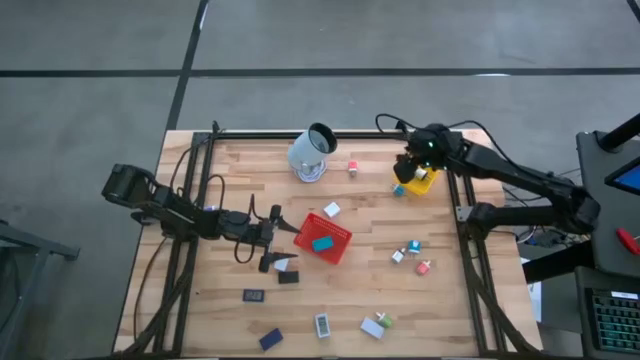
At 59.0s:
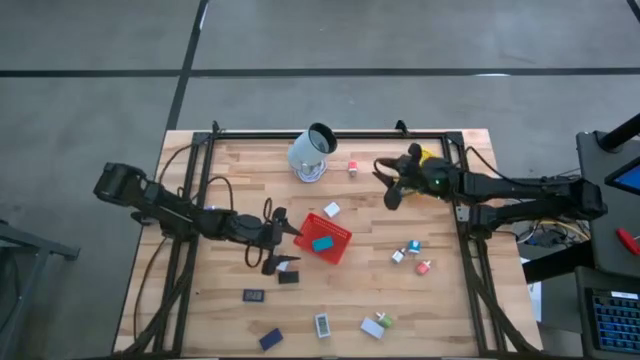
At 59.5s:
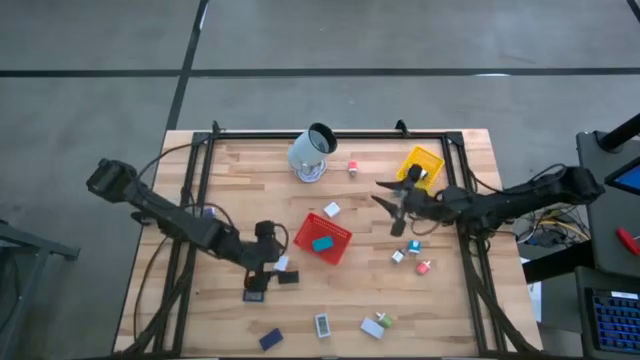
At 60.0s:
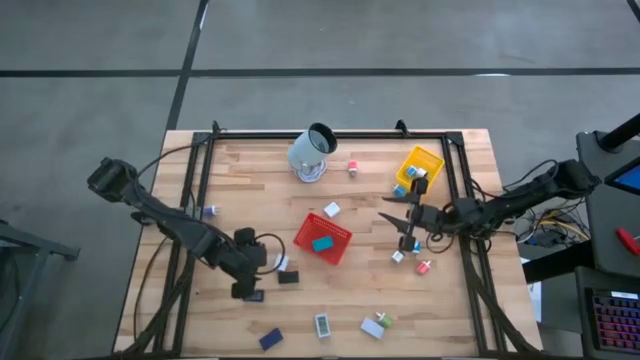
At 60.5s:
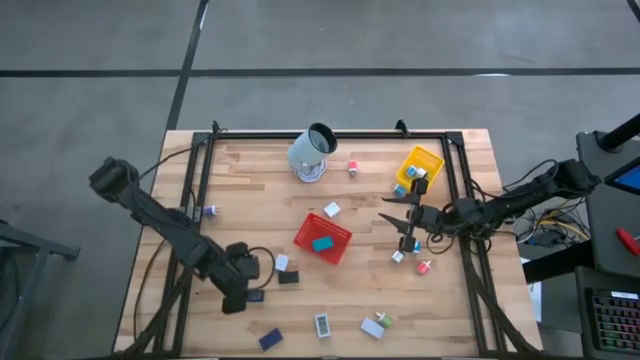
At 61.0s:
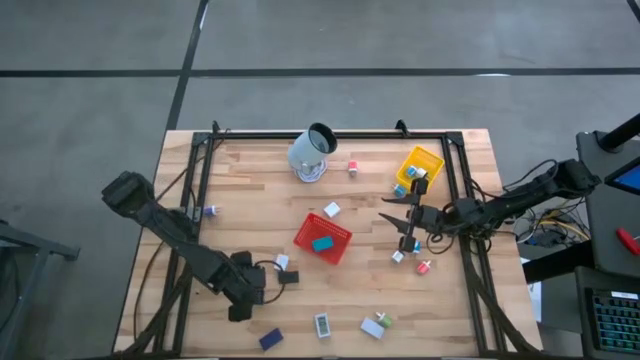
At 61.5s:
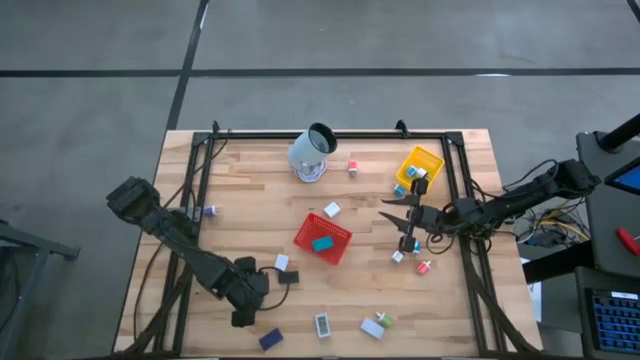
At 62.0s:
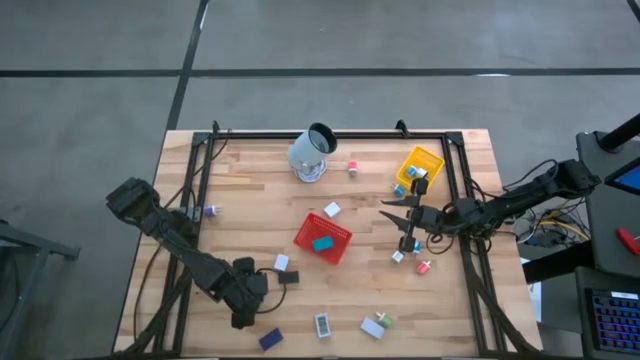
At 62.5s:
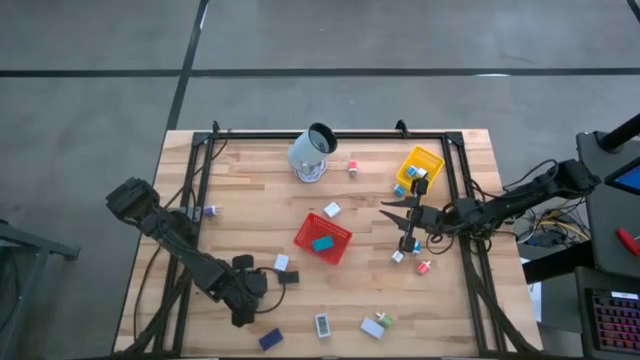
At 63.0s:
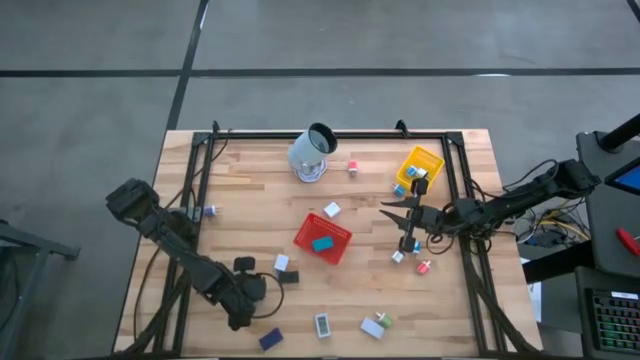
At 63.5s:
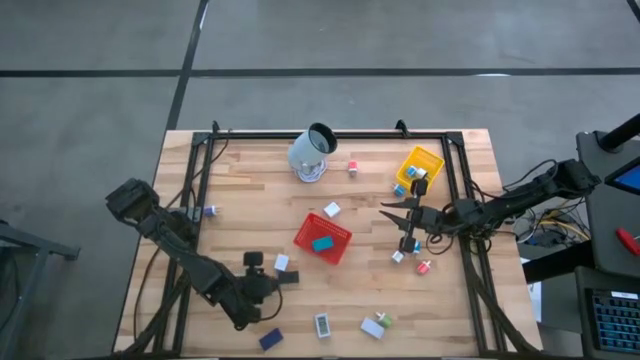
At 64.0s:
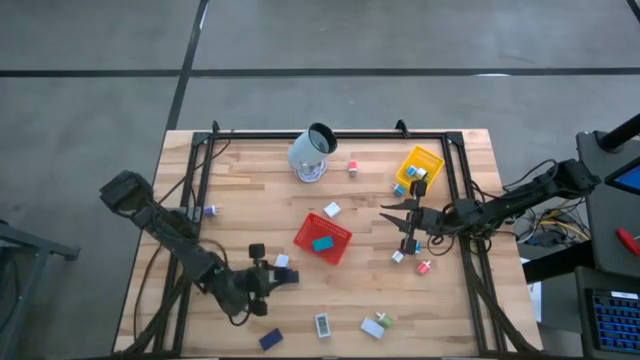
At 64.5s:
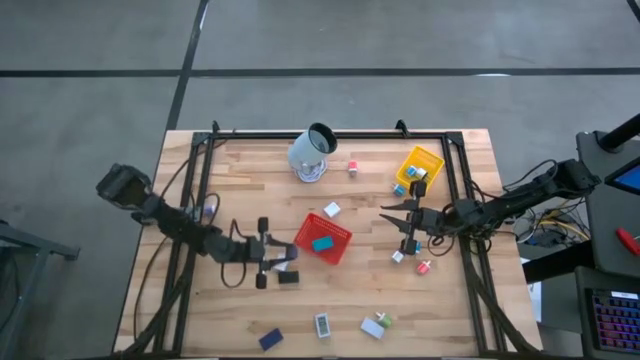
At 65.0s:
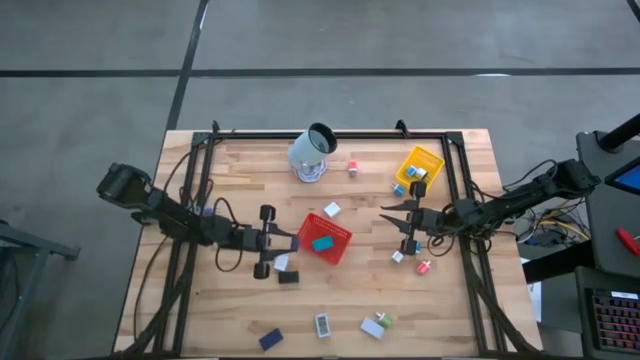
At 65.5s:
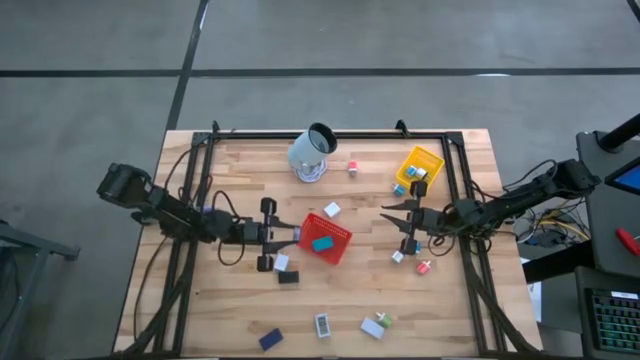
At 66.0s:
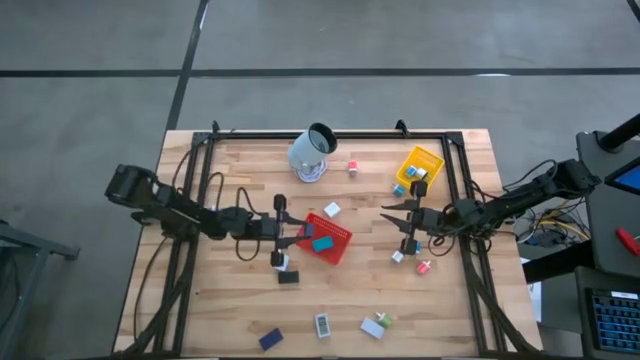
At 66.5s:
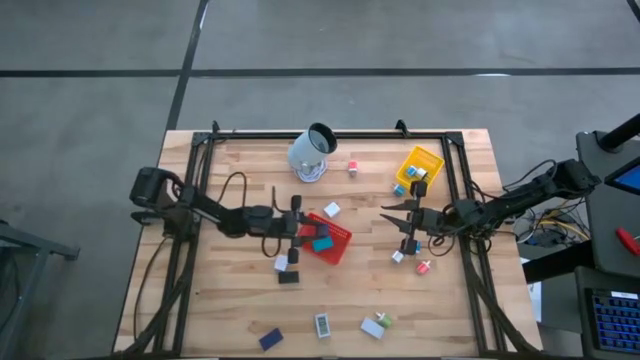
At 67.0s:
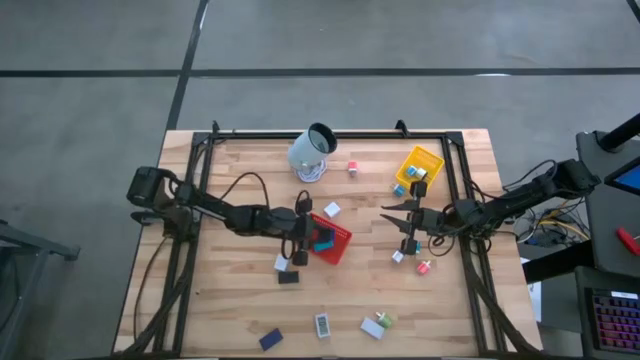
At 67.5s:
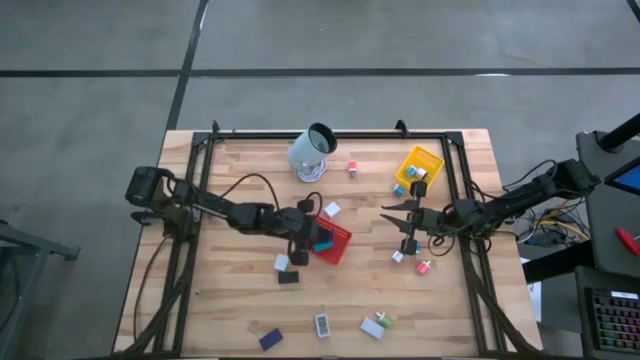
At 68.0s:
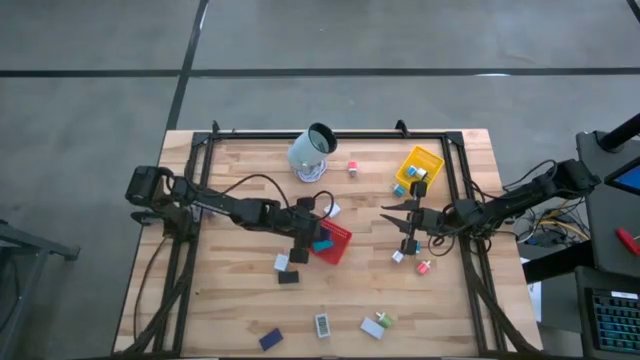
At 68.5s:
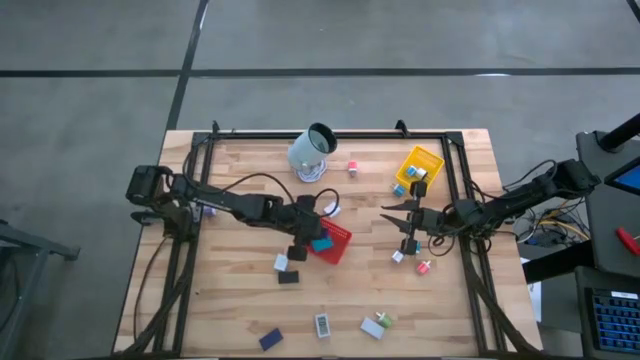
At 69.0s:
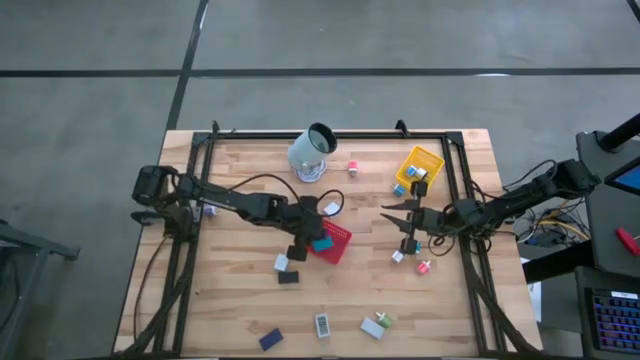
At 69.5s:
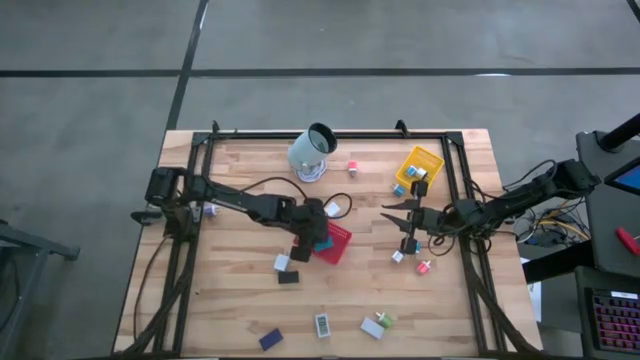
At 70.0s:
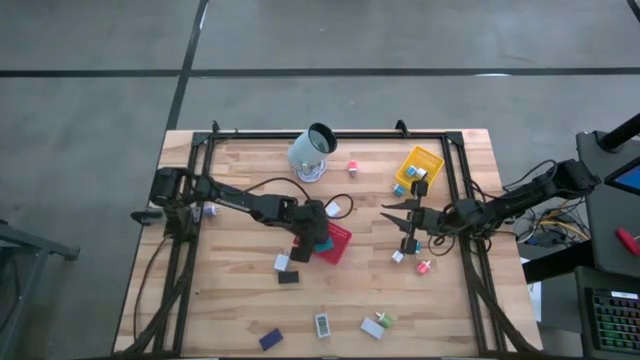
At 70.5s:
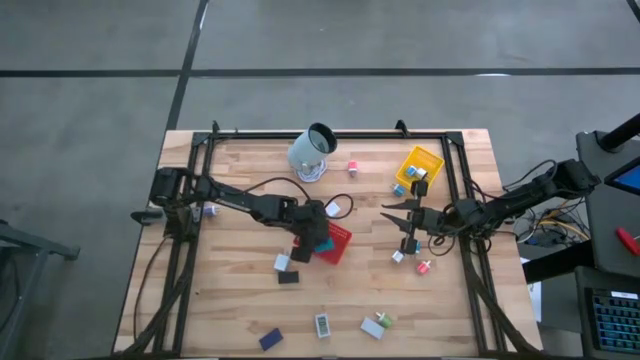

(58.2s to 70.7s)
Task: Pick & Place Office items
Put the top blue digital clock into the red basket

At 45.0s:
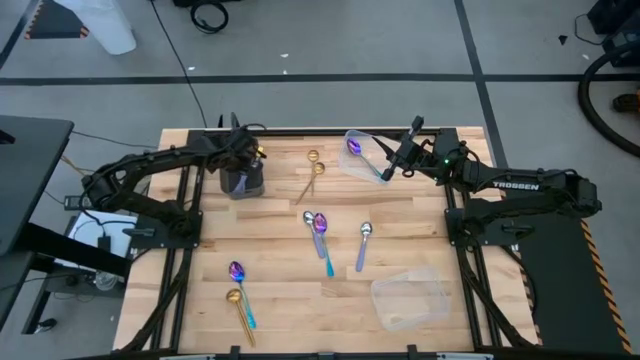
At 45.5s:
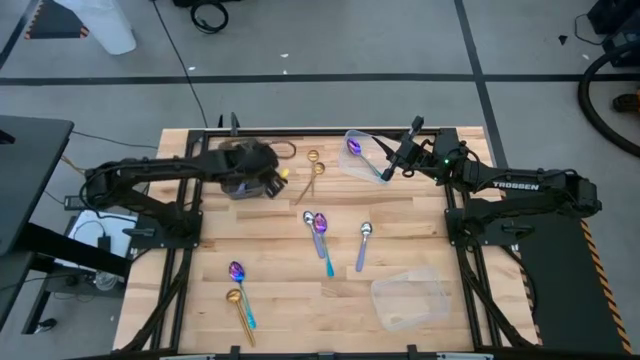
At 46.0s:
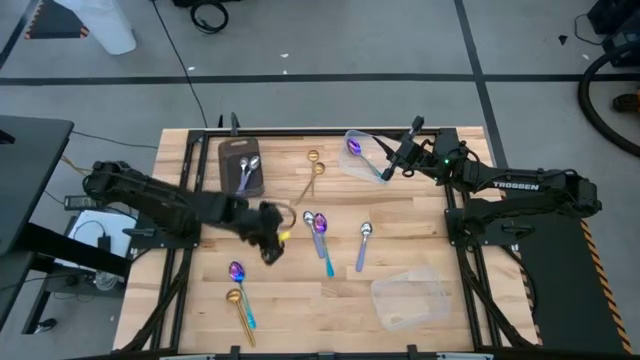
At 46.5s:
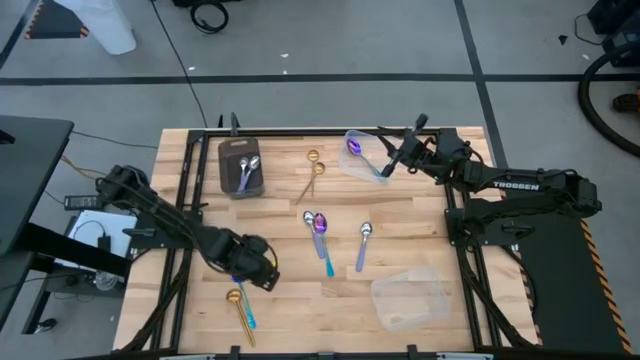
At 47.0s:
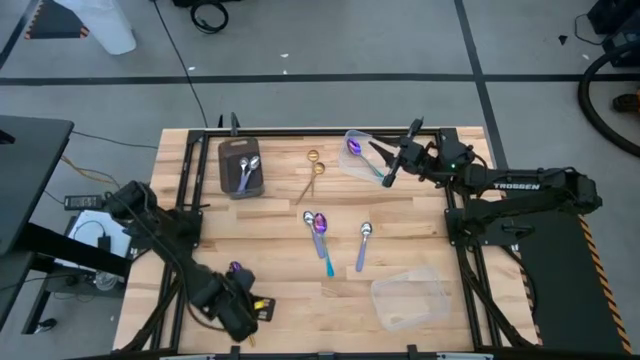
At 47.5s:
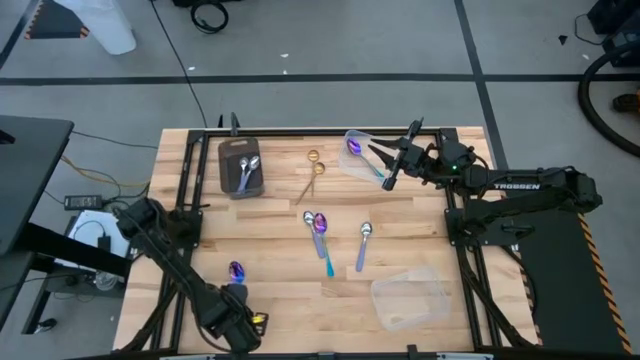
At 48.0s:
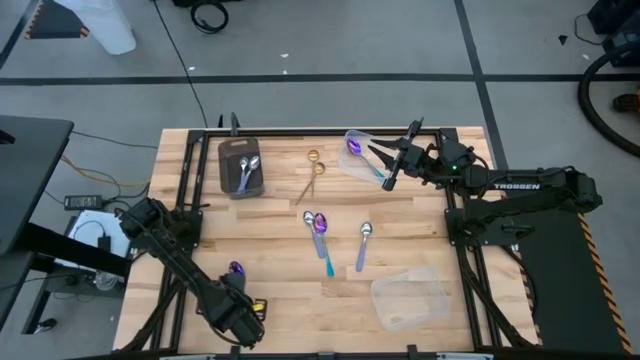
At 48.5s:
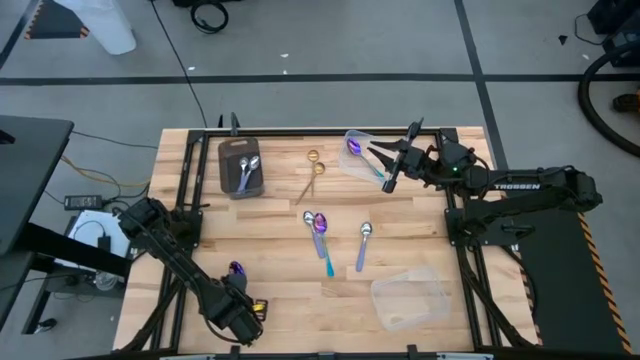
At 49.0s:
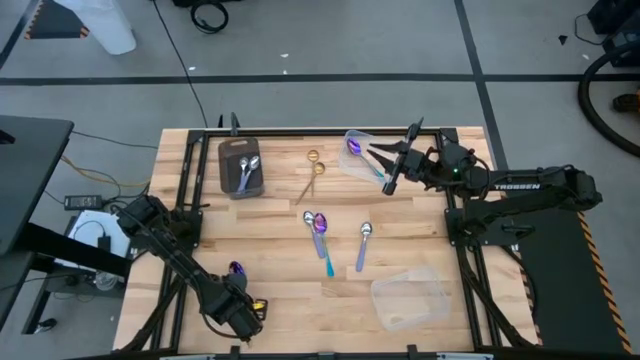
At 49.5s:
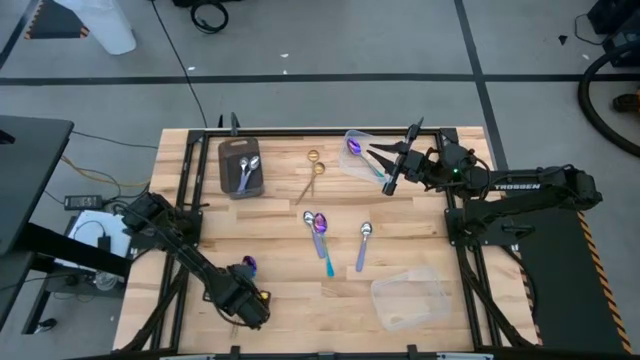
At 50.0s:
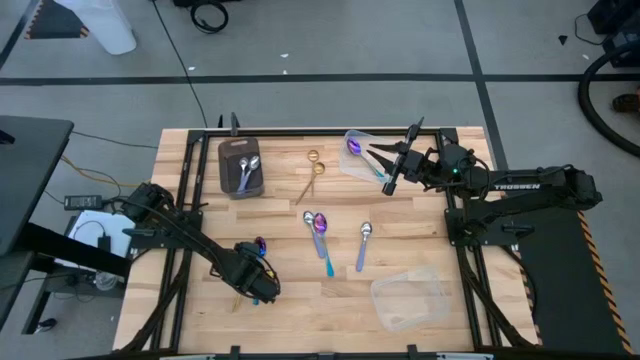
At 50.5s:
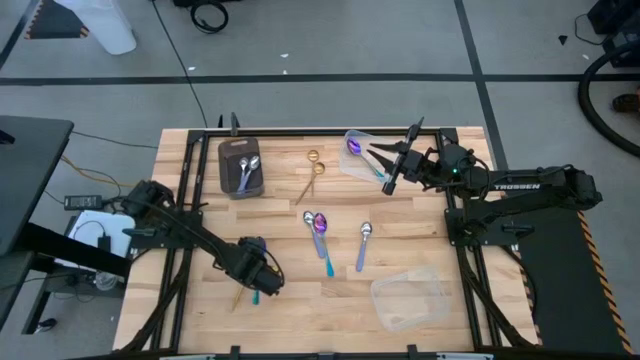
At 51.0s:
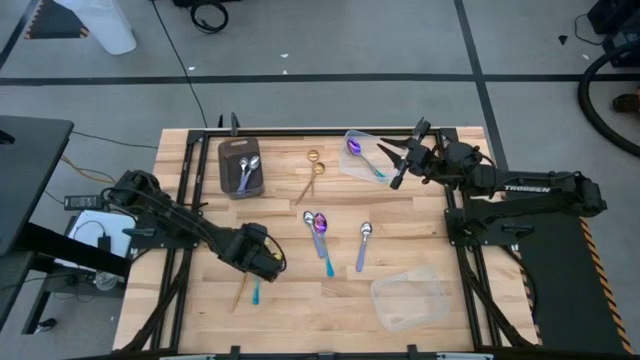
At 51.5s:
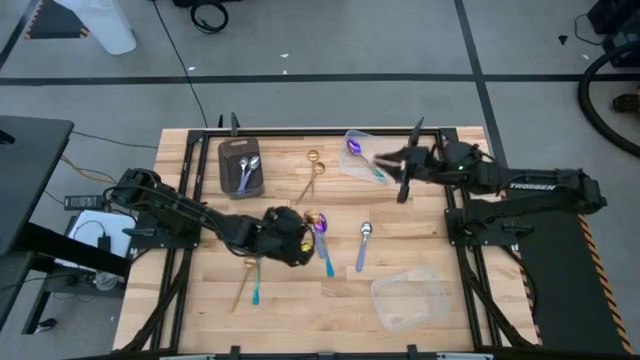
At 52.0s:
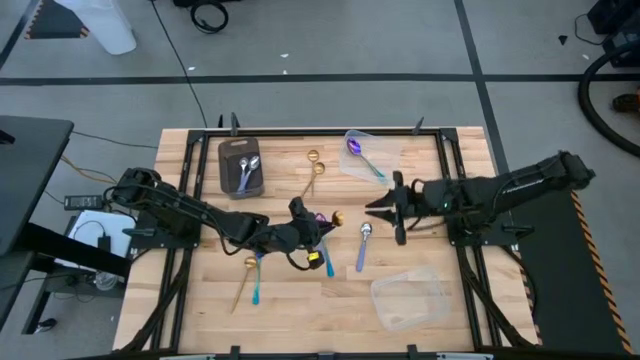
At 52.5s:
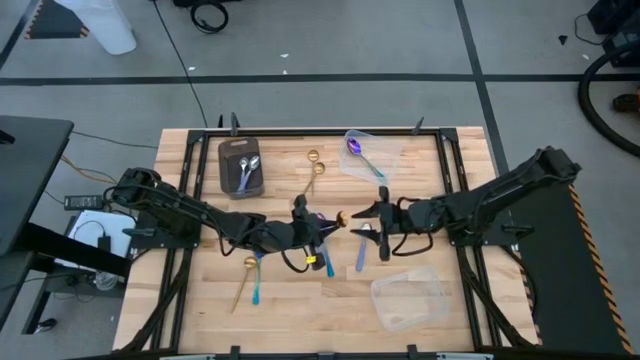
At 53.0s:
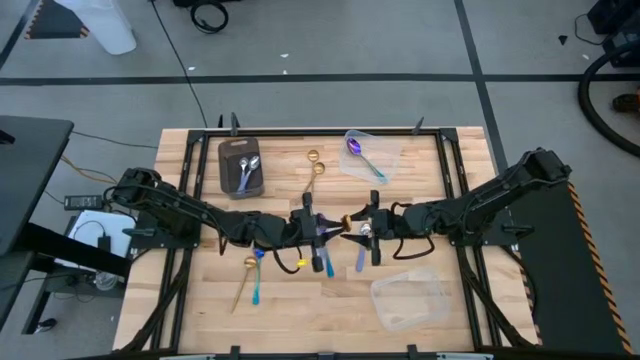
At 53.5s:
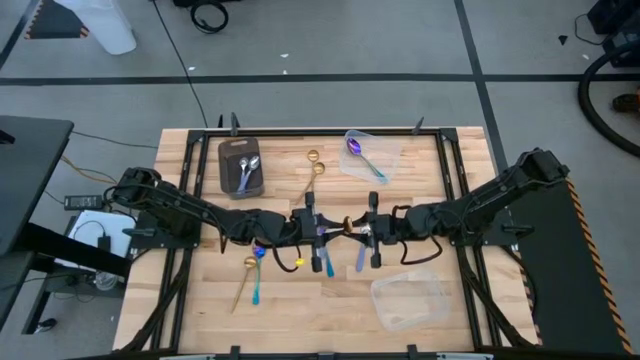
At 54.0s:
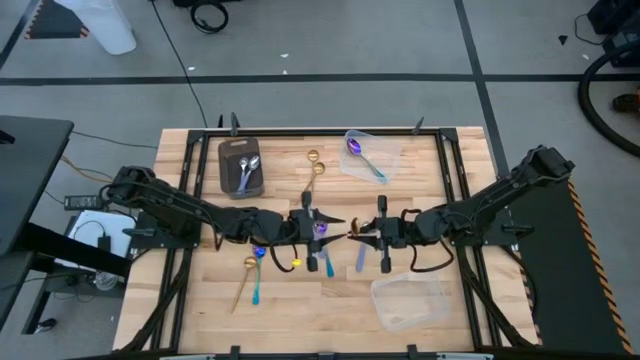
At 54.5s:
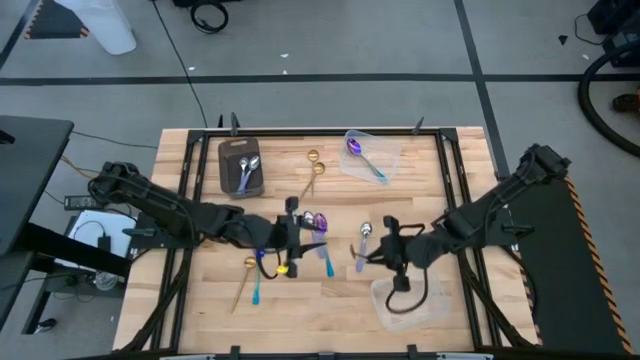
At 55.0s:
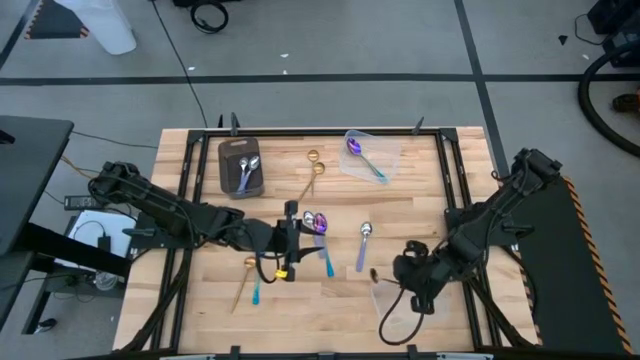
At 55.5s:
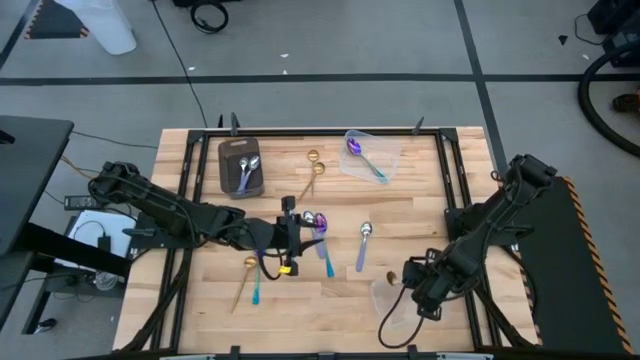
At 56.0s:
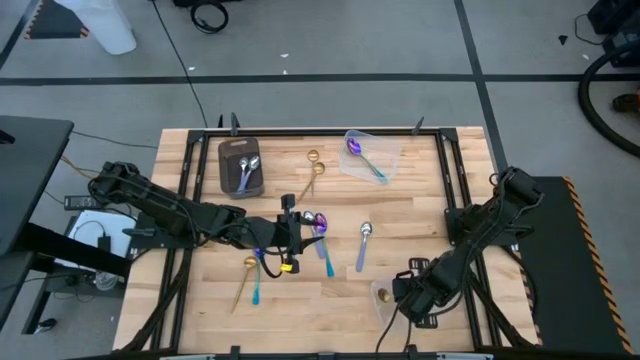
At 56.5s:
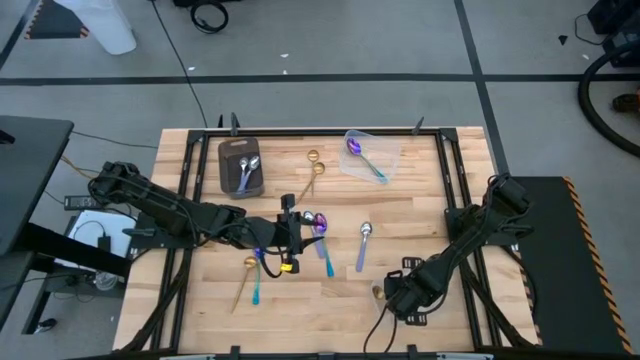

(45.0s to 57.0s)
Task: Sort silverware by color (type)
Put the yellow spoon into the bottom transparent bin
